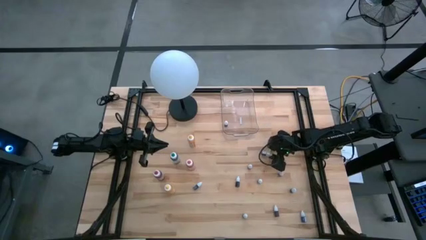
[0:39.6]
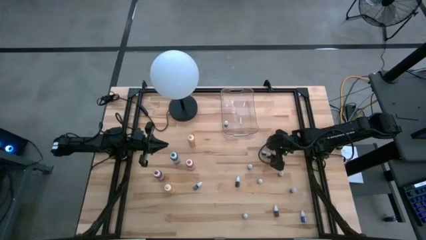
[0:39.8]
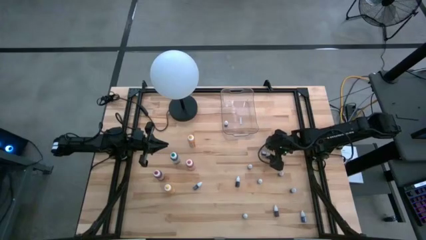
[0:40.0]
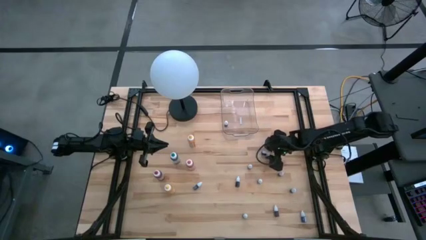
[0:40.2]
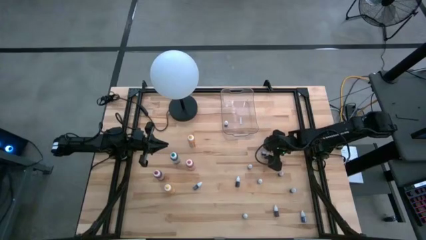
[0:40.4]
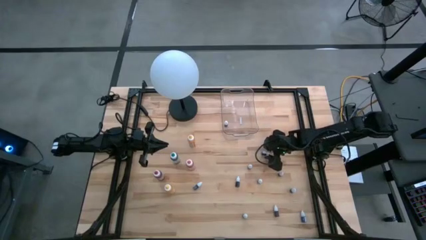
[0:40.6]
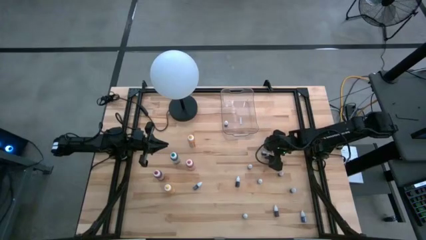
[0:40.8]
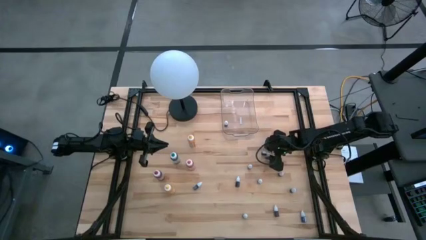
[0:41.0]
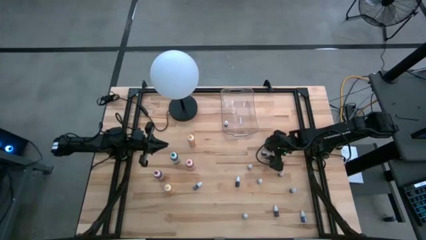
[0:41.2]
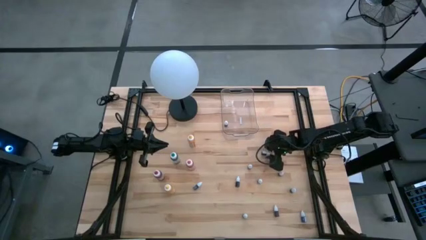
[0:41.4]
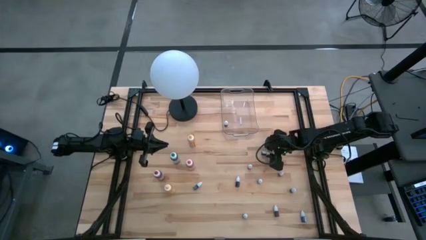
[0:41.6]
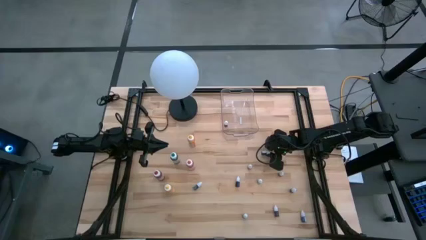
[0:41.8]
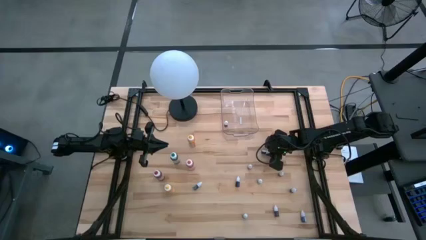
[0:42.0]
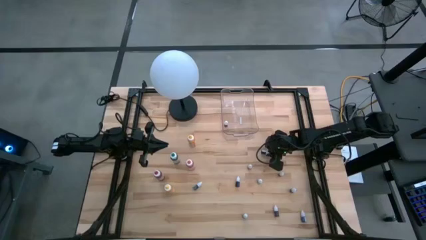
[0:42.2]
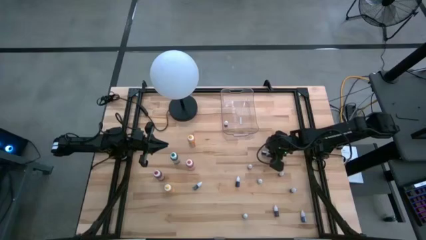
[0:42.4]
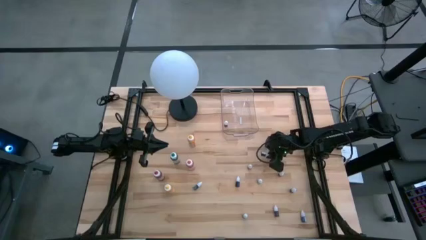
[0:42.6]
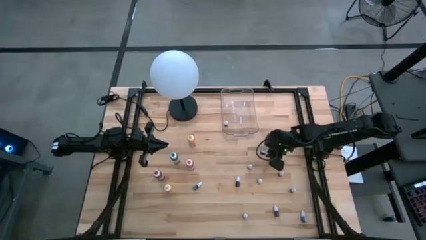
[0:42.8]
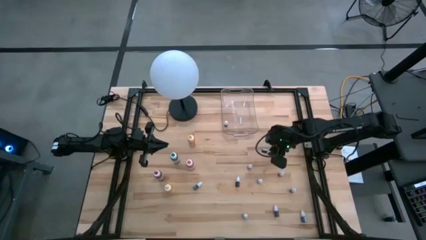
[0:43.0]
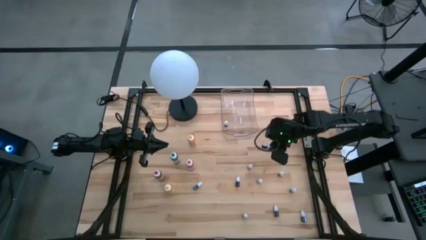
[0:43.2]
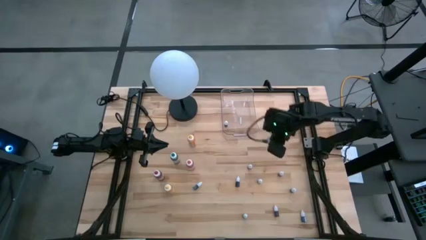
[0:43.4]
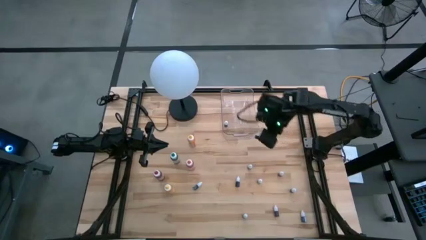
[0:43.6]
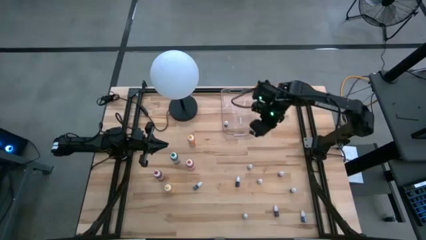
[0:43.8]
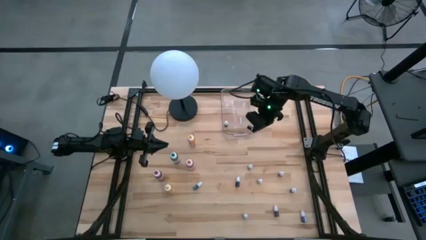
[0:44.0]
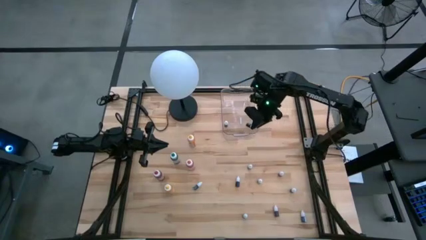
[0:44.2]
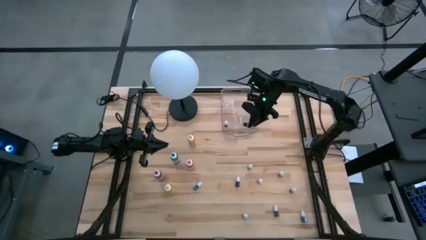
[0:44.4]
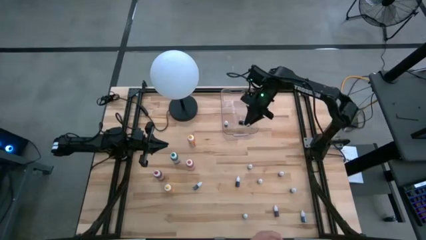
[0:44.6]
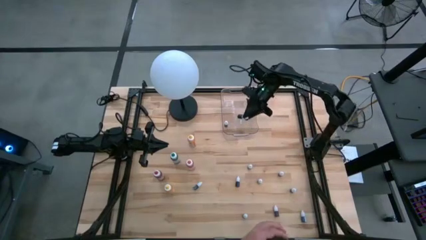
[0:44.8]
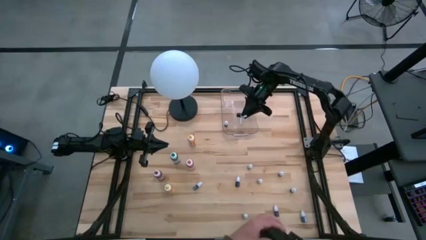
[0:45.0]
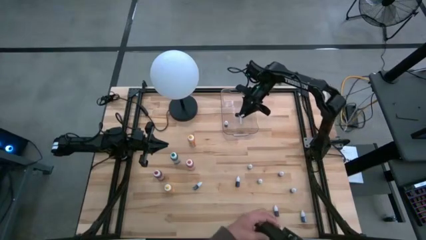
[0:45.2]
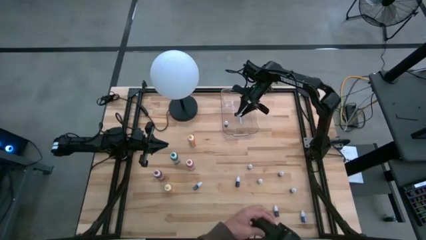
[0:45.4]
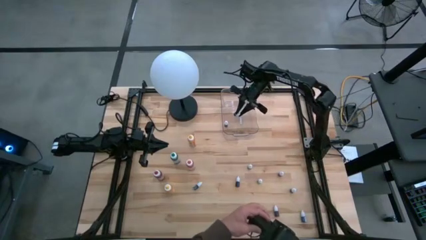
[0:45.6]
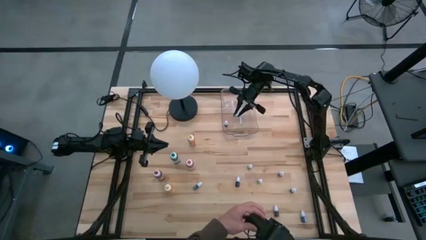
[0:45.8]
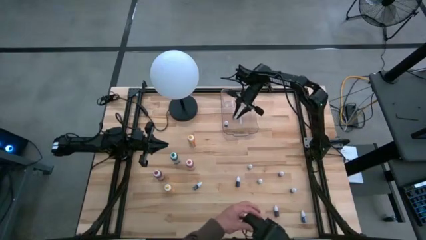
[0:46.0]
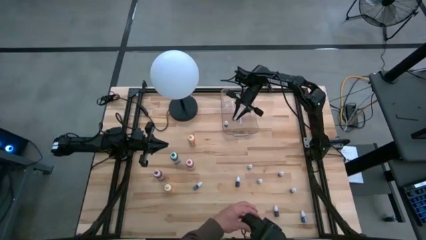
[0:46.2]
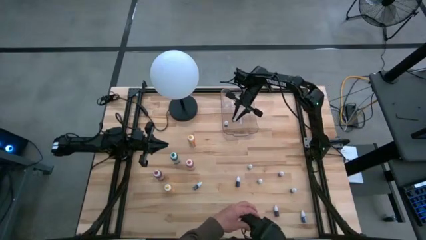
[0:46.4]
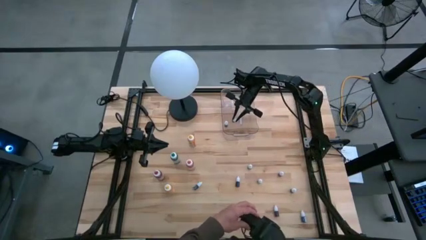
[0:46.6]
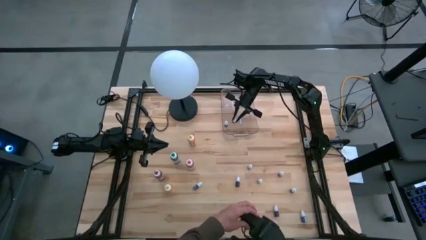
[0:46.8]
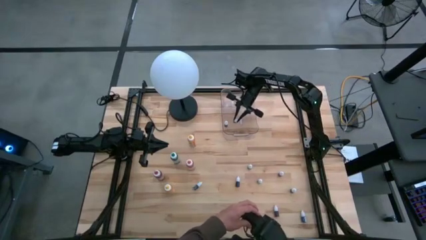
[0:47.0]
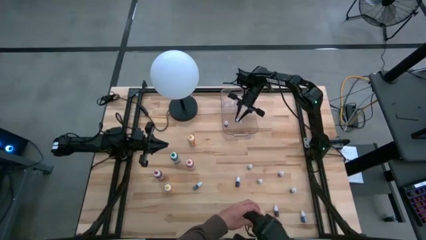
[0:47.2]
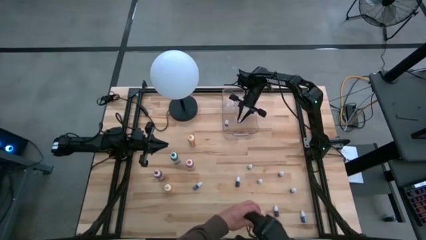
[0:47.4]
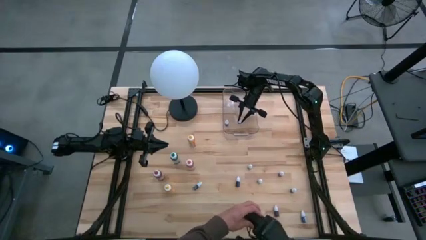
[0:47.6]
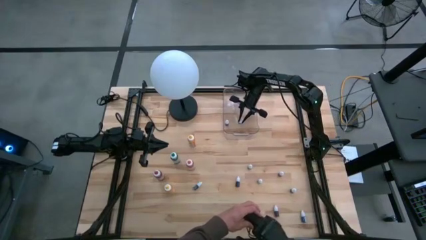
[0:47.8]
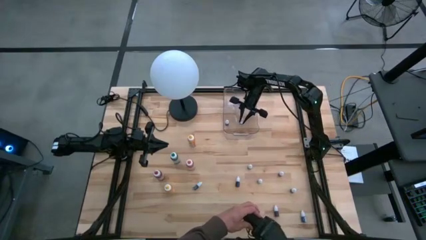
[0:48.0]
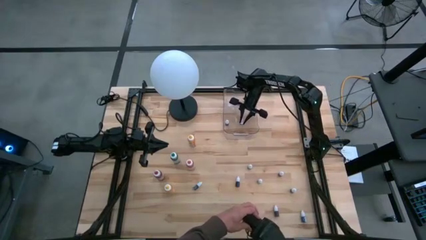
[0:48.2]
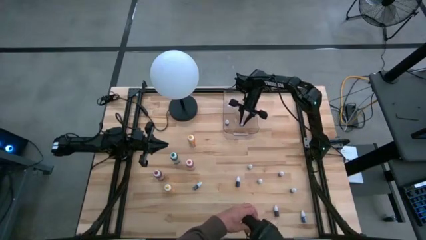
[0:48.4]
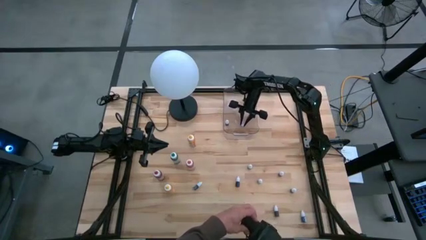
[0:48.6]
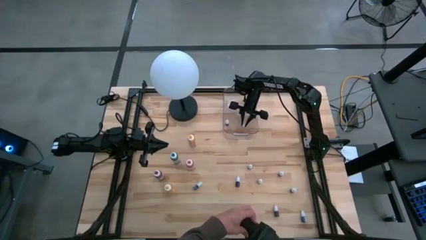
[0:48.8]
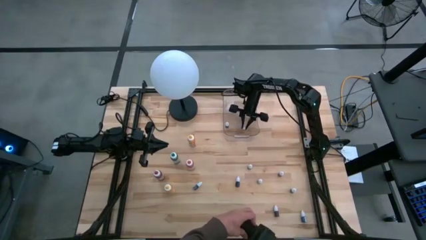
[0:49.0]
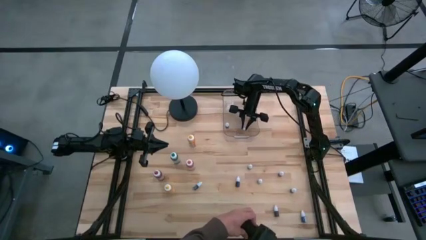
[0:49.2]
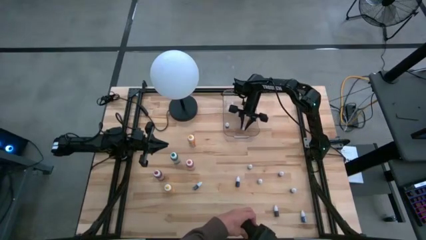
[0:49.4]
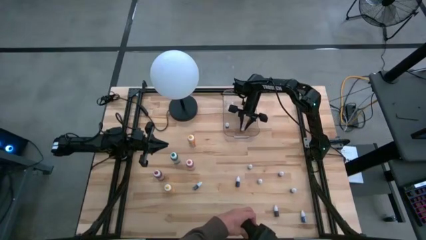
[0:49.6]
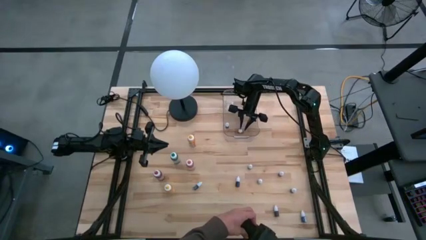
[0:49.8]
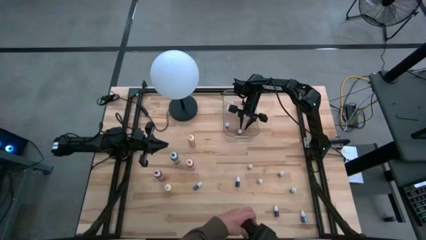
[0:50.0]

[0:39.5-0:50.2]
Task: Pick & Place food coloring
Put the small black food coloring bottle into the transparent bin

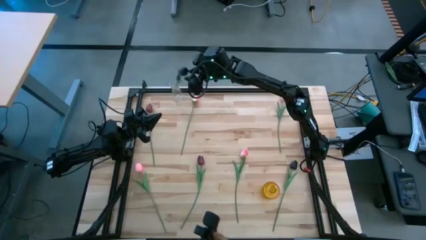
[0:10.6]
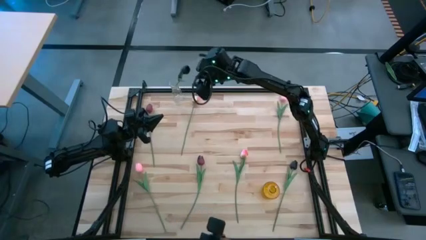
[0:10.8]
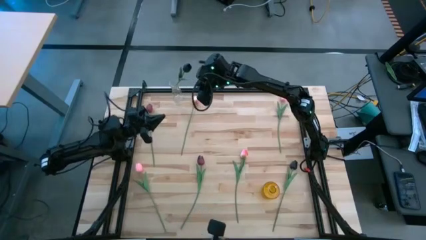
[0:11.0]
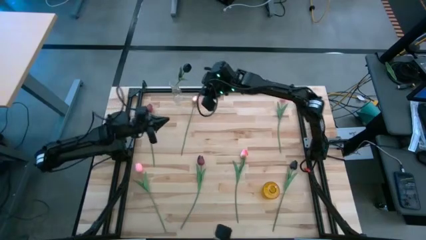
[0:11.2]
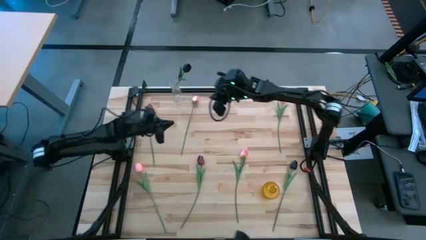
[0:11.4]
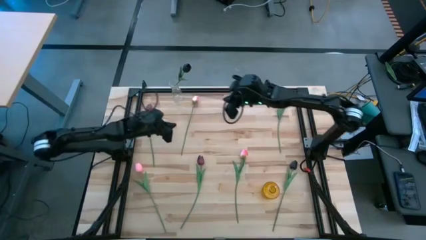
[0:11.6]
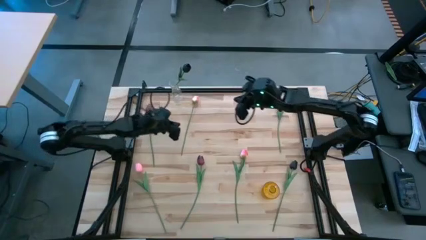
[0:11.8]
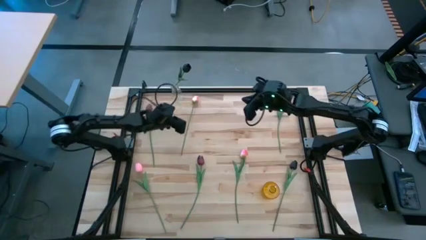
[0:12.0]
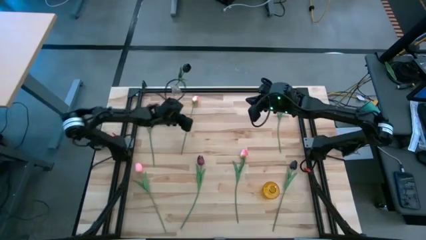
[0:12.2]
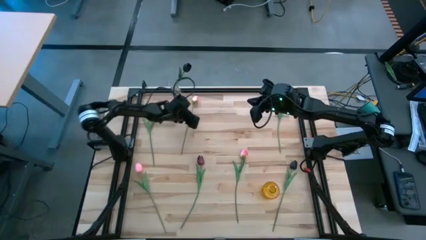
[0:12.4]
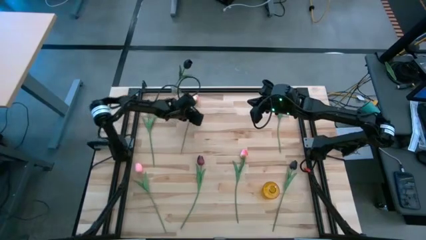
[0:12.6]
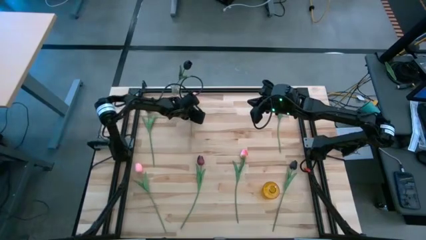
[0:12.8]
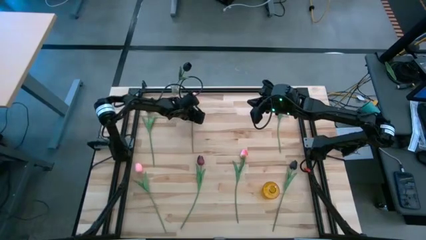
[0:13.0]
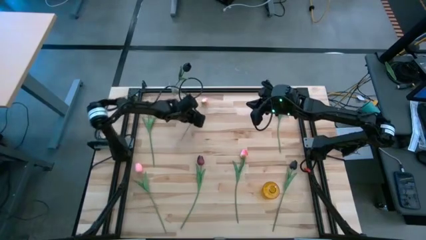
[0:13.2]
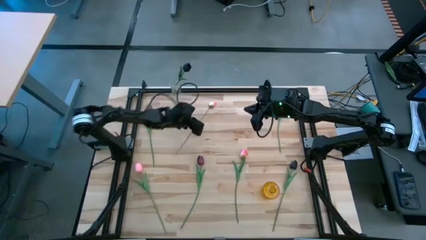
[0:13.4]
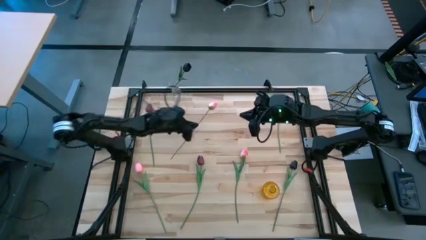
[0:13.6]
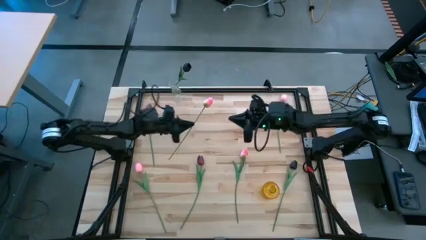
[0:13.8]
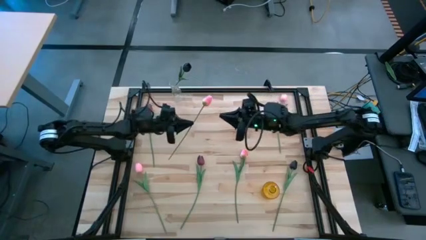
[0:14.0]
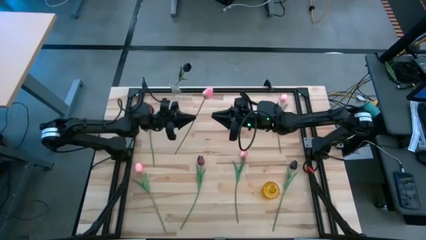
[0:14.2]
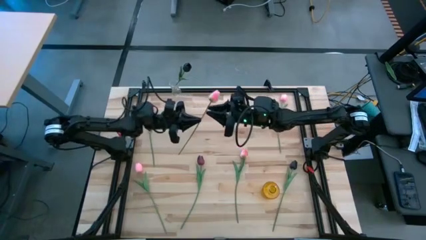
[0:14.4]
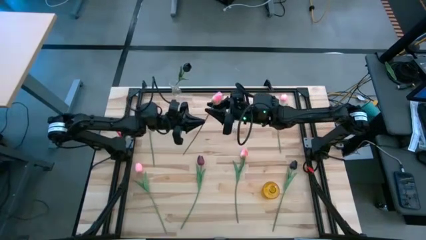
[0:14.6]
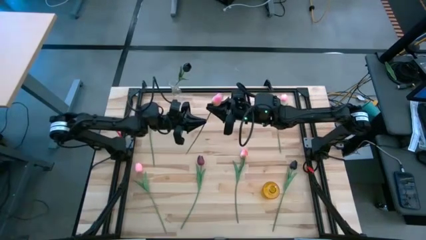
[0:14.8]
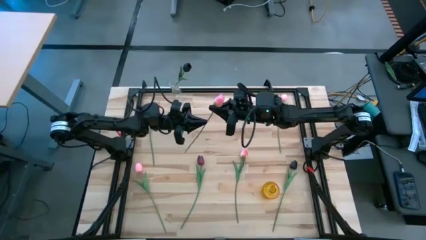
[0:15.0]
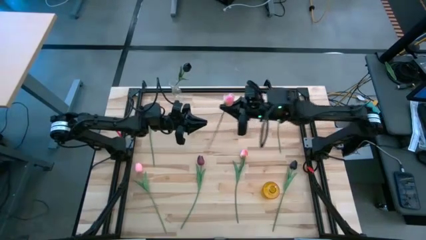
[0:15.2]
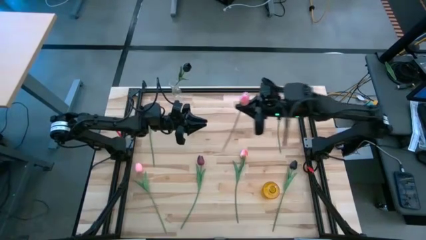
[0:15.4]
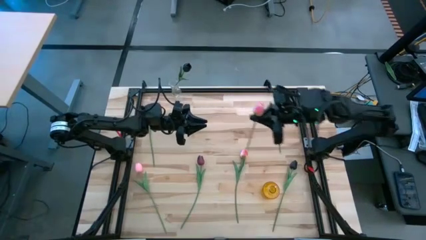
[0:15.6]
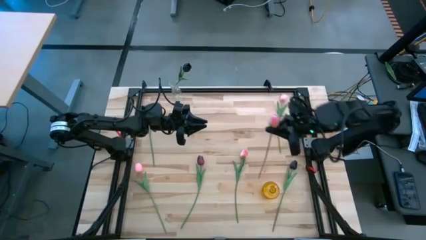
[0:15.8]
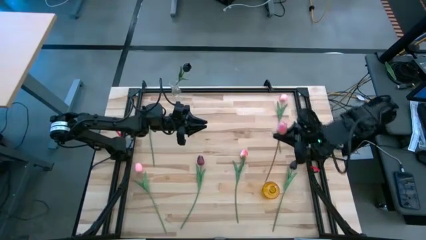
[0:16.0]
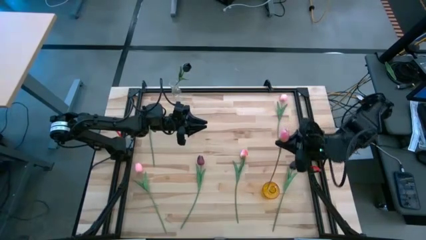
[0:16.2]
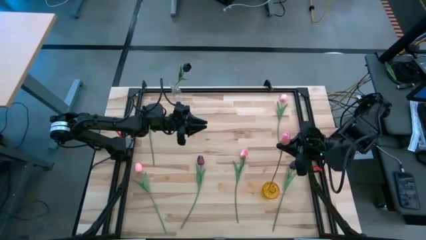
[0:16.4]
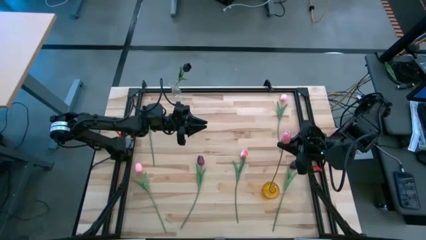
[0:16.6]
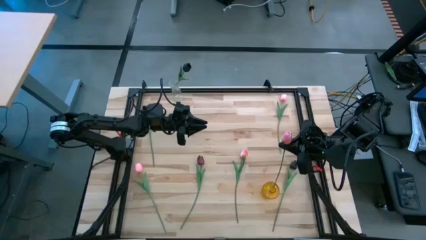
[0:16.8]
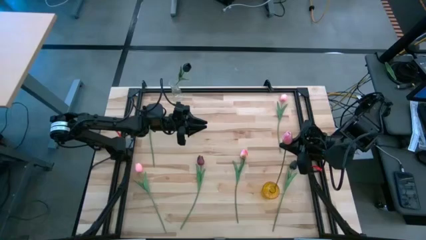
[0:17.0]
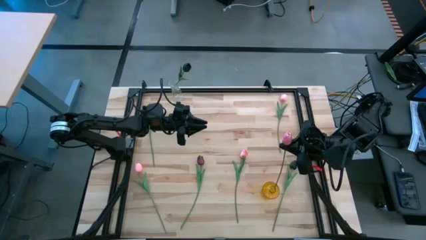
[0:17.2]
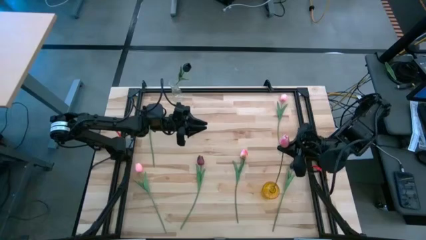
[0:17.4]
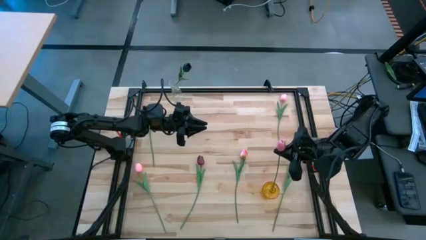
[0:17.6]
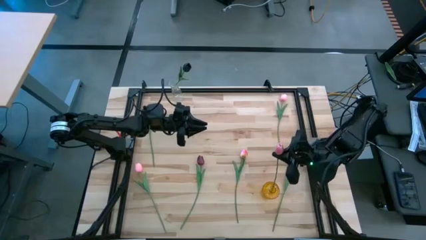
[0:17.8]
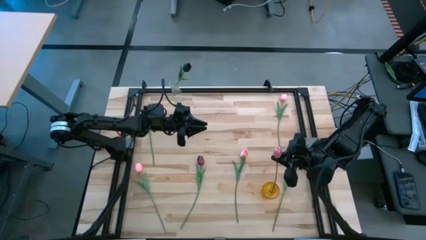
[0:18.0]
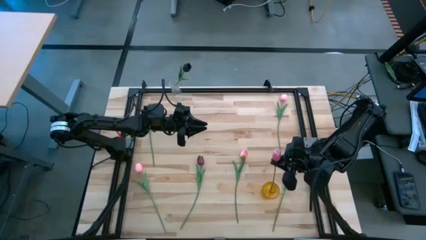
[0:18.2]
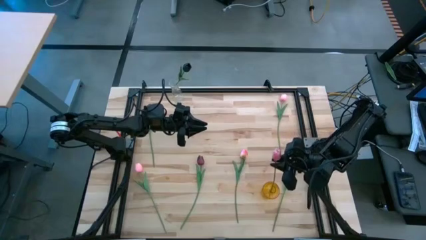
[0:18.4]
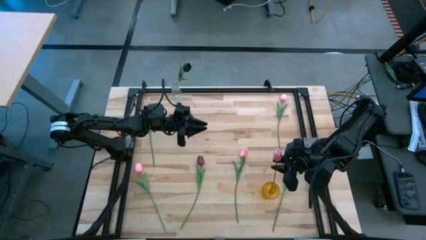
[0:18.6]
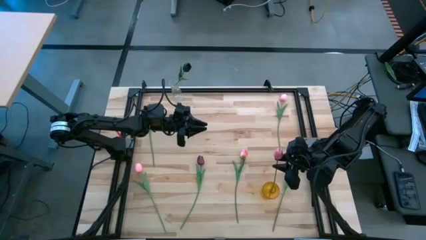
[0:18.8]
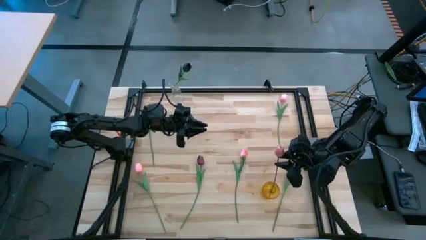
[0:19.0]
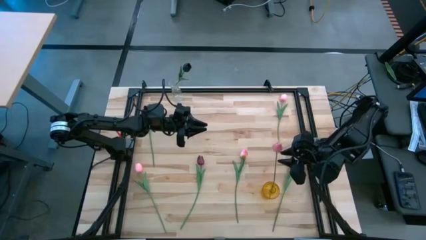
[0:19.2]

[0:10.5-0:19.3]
Task: Sort flowers into vase by color
Put the top yellow-pink flower into the yellow flower vase
